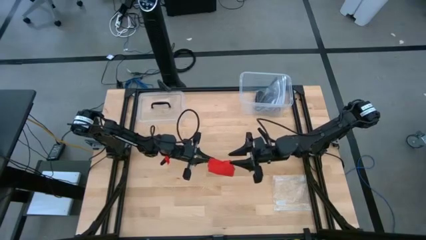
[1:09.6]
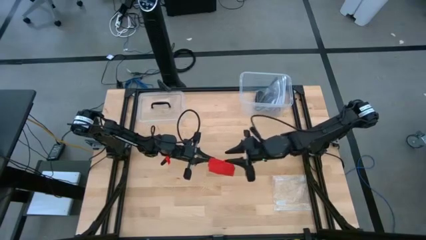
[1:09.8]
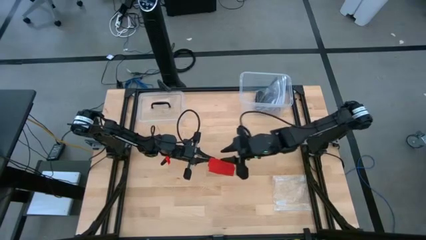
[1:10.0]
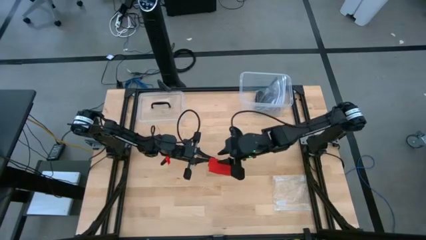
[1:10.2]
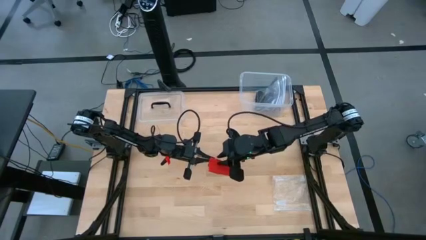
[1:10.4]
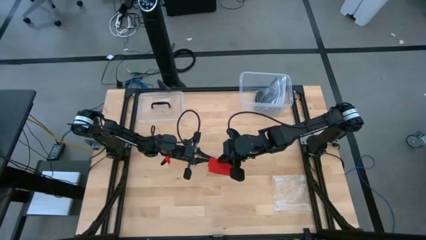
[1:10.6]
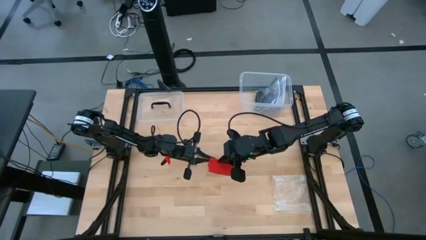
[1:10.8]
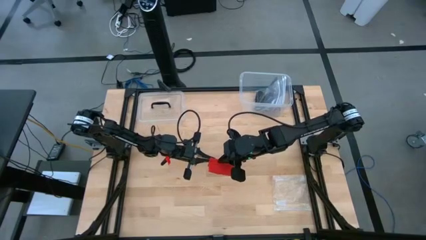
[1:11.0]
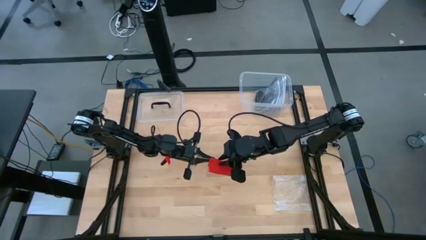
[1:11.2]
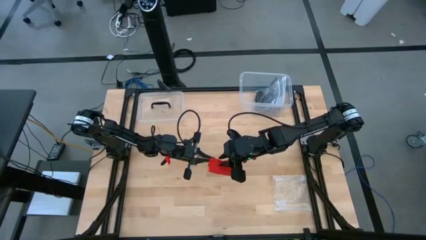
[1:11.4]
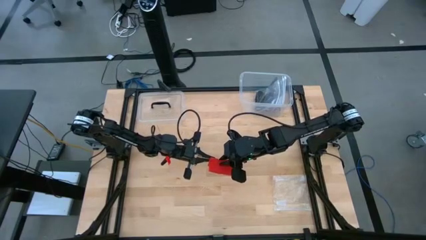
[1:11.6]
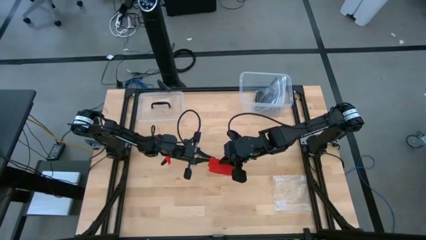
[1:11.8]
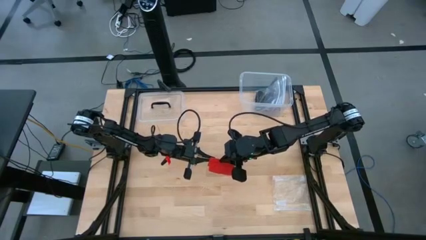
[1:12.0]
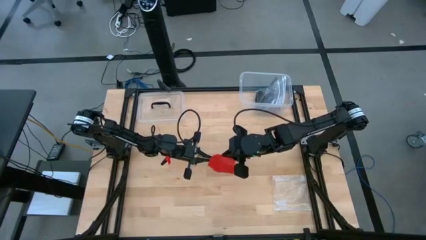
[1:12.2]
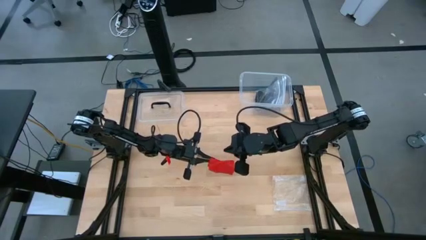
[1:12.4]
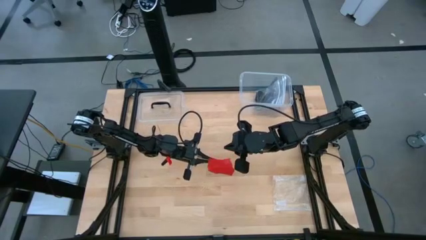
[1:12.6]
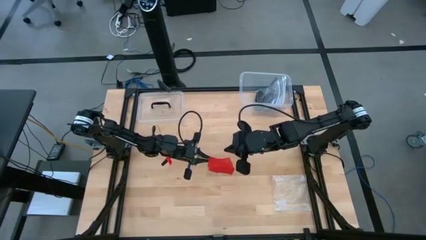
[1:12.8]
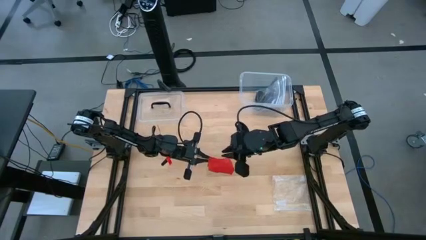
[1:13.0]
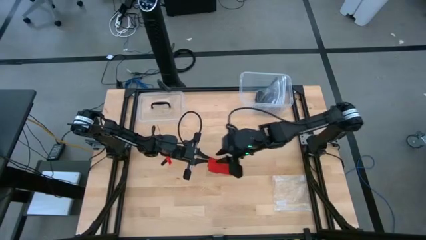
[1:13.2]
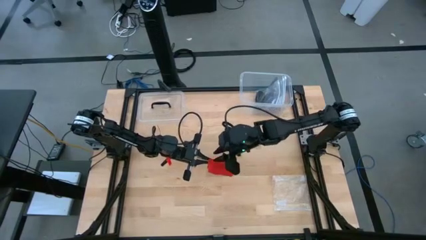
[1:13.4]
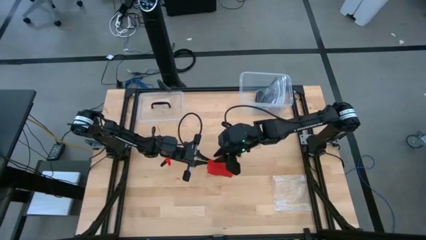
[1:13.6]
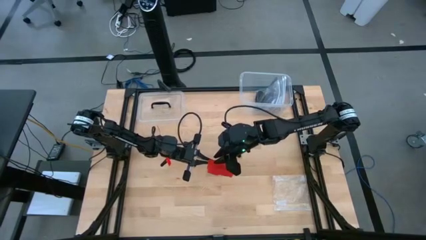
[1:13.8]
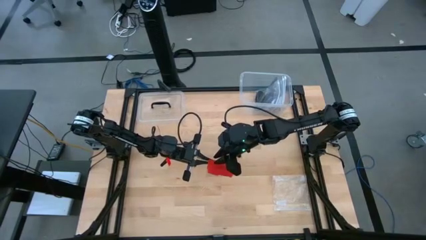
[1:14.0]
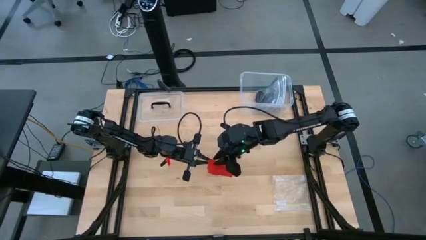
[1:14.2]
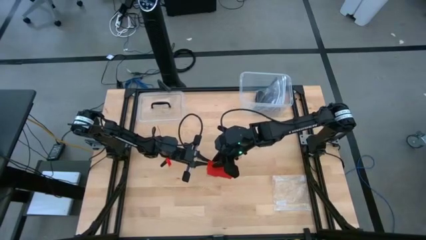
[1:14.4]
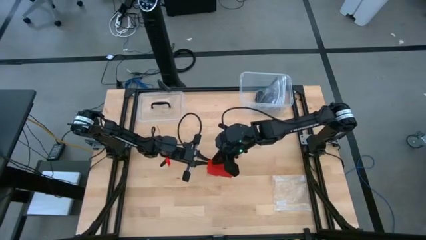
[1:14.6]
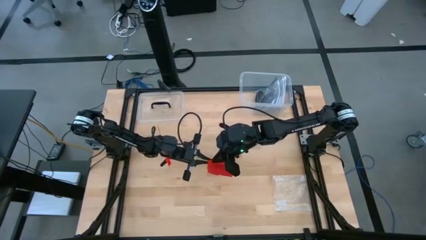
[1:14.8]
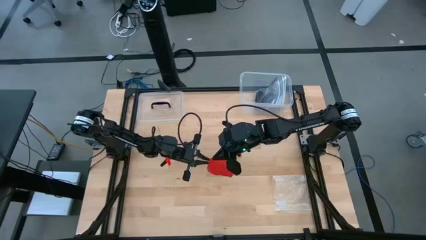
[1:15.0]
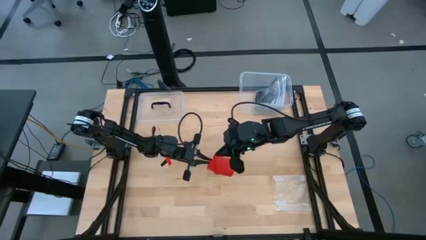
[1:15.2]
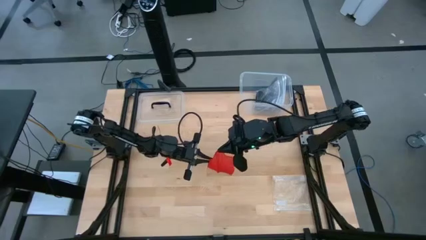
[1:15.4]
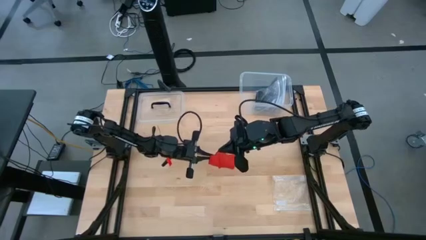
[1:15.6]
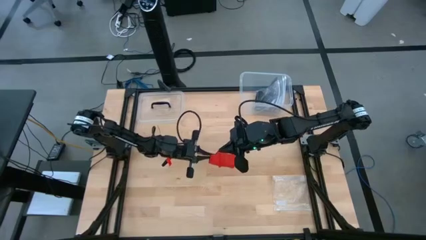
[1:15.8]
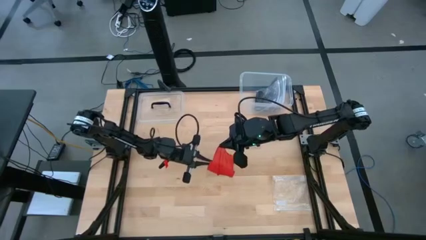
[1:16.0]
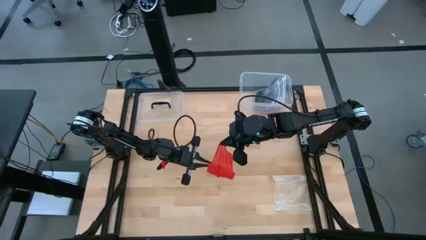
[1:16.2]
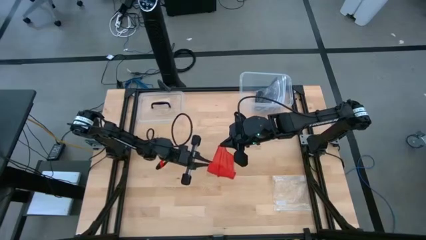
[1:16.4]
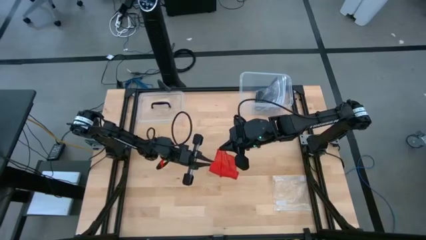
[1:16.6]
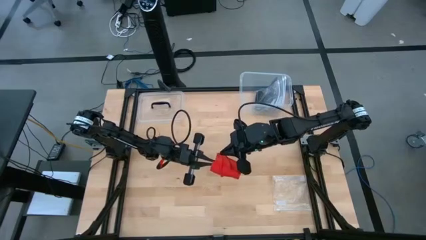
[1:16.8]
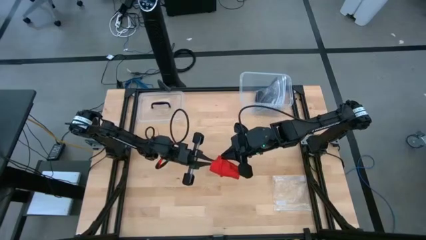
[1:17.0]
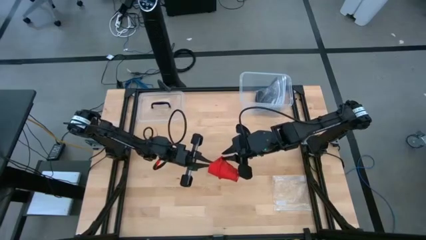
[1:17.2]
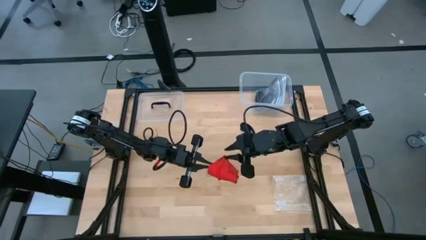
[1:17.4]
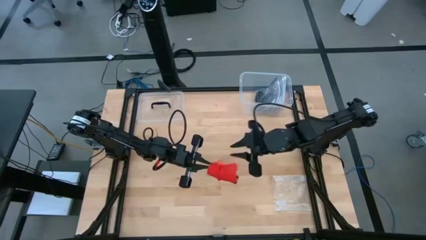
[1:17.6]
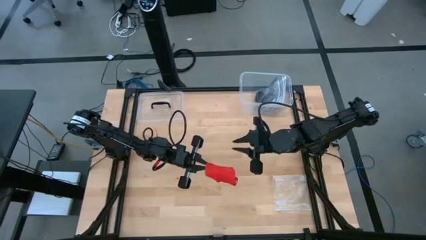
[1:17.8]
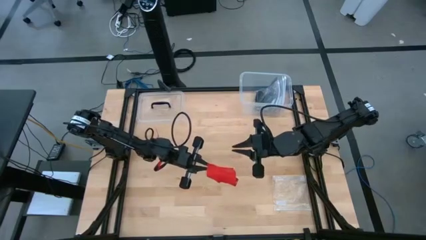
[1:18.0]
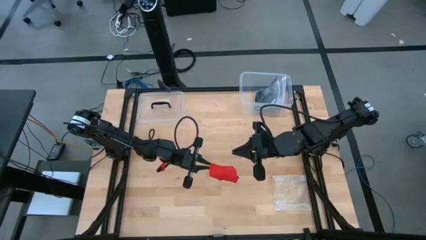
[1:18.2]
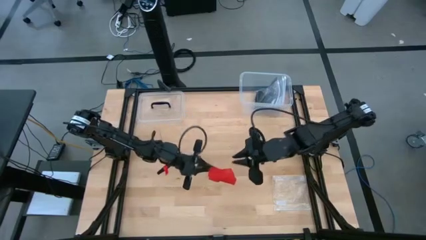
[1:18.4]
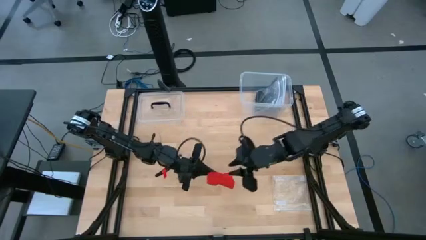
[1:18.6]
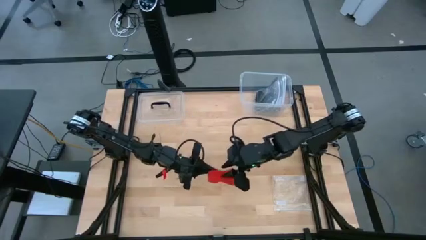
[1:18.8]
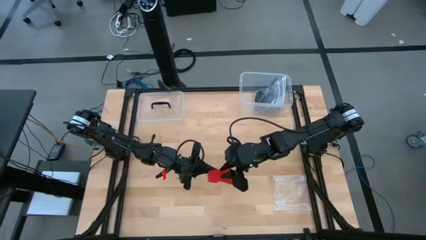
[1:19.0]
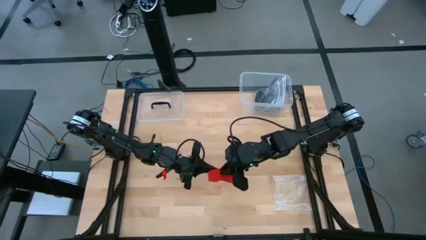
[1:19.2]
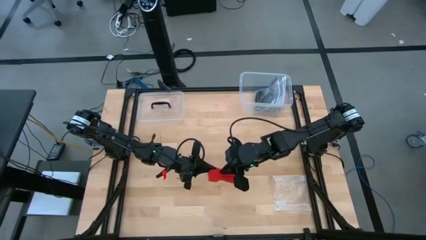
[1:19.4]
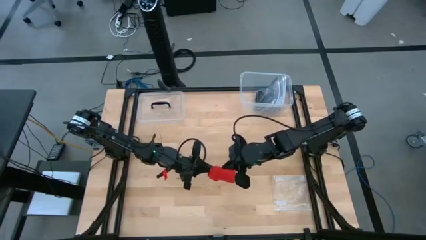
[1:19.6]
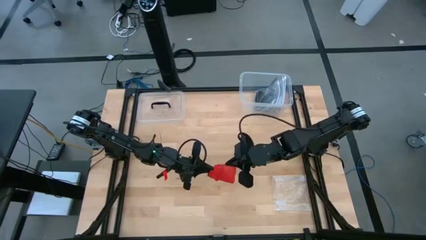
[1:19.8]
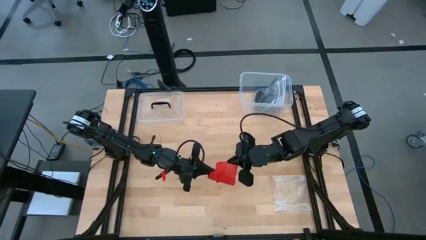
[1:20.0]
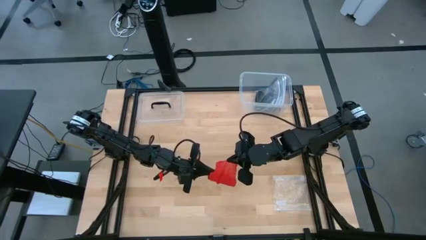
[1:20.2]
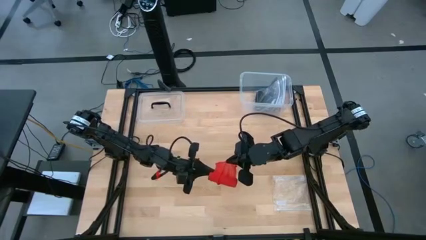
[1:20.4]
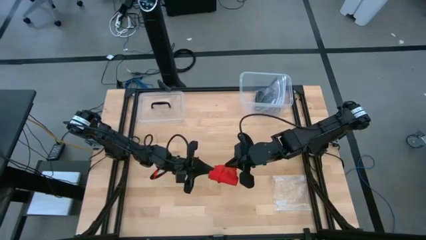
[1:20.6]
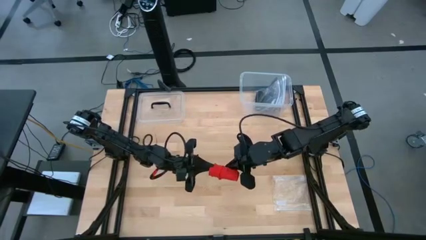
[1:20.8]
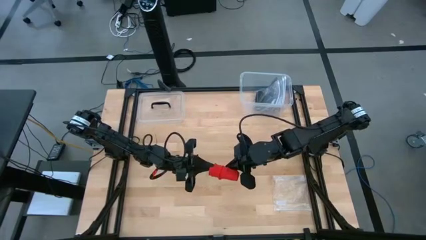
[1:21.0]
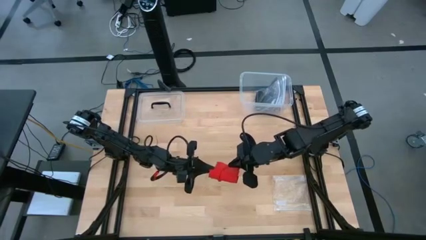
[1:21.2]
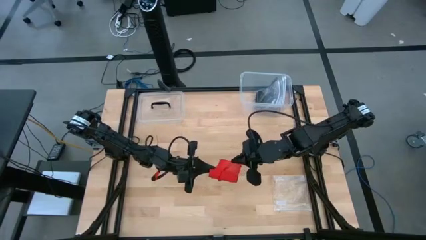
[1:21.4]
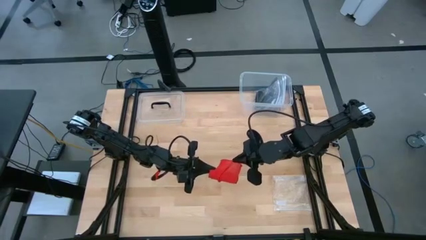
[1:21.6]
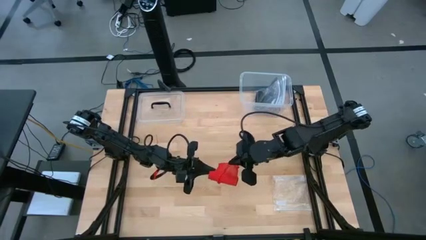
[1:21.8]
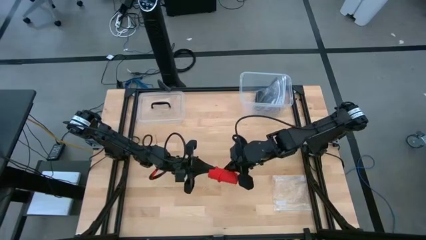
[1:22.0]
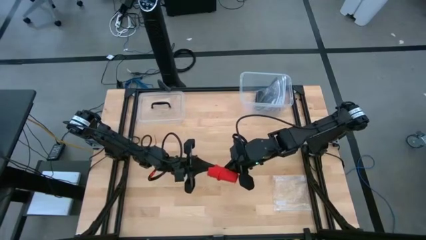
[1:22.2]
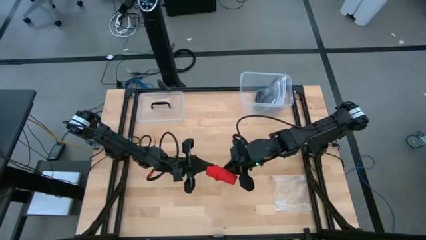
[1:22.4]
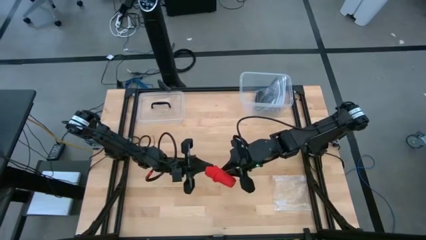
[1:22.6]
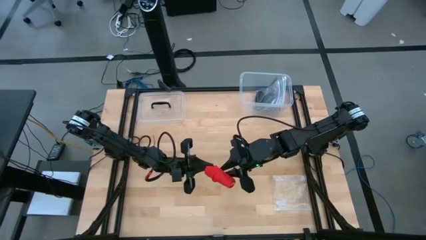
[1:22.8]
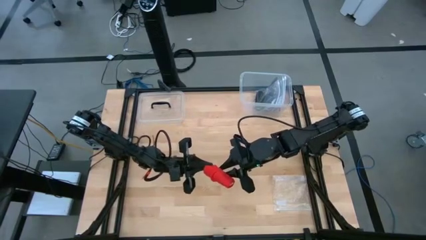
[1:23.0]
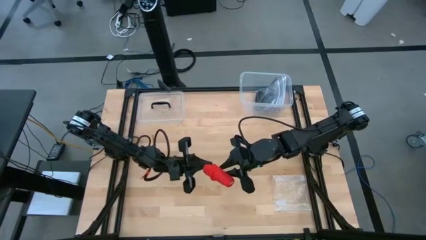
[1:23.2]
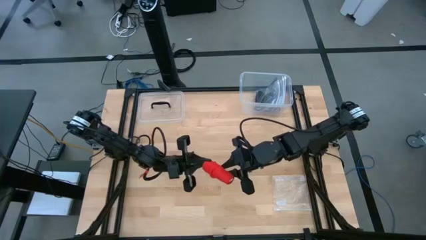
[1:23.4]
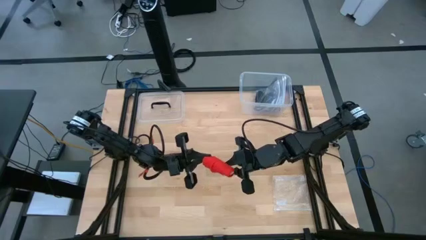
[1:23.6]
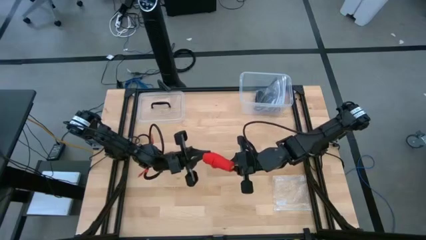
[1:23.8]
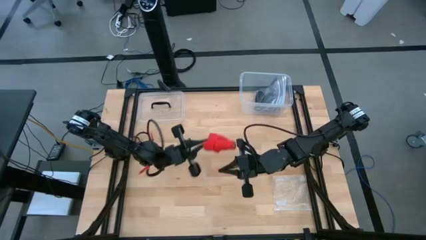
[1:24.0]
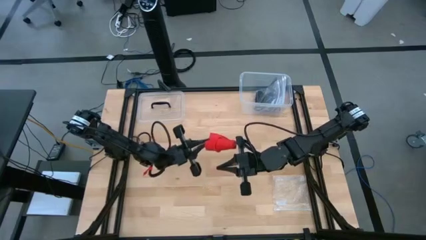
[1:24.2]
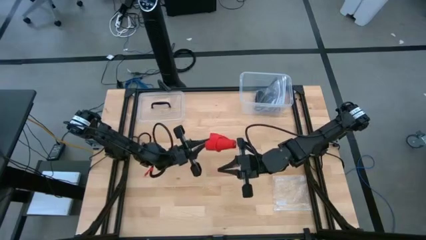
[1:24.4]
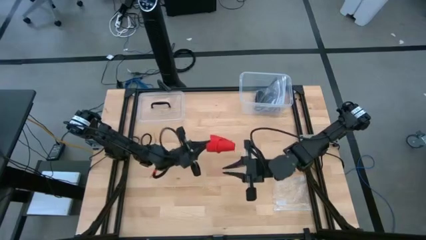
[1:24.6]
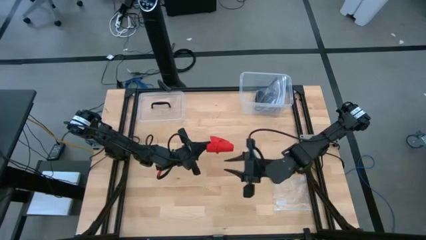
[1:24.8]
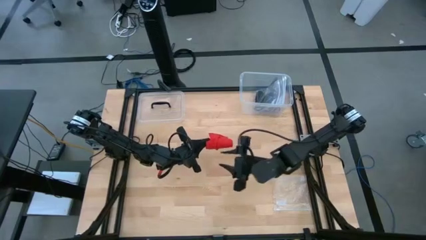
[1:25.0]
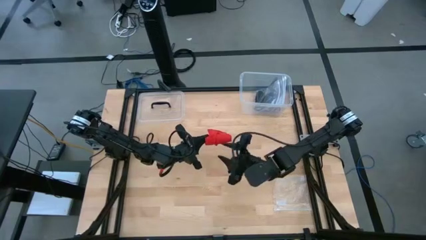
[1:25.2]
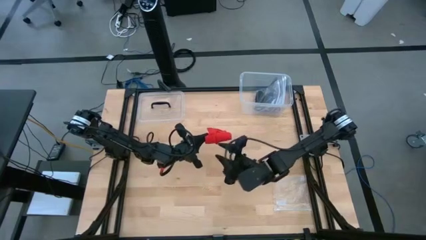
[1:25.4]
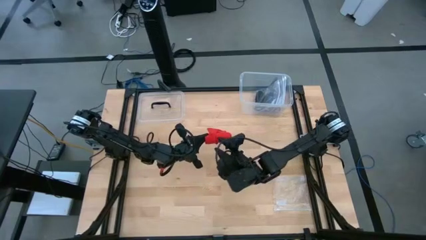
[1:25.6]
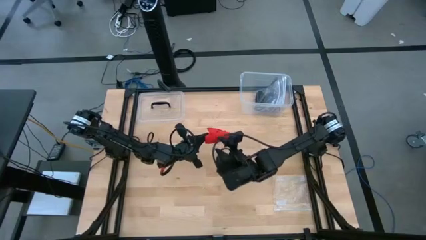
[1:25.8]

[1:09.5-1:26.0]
Task: Roll bandage
Roll the red bandage
